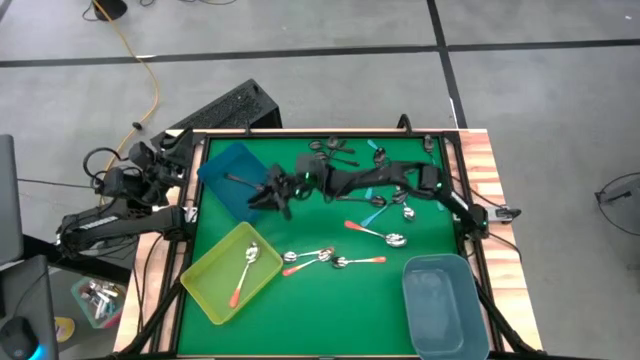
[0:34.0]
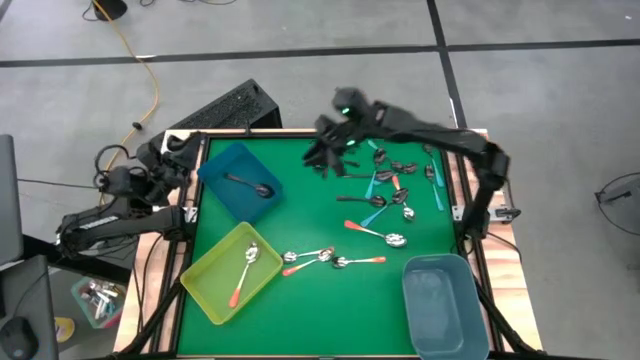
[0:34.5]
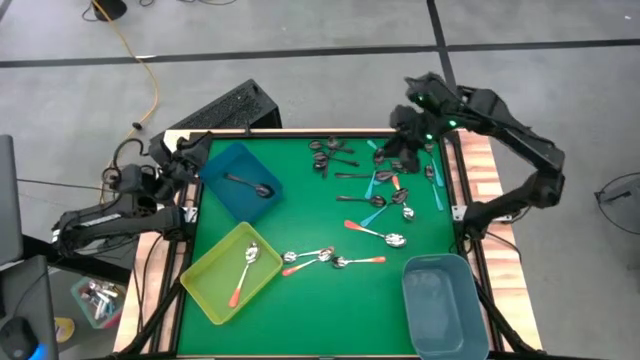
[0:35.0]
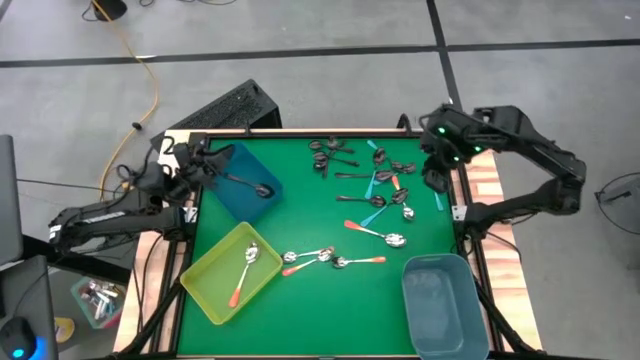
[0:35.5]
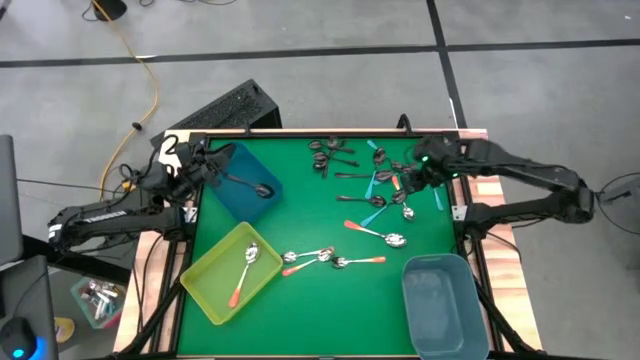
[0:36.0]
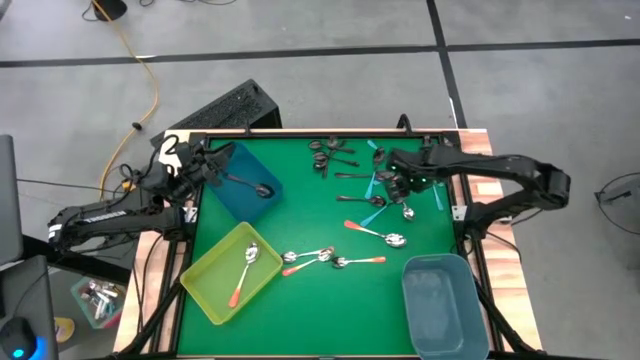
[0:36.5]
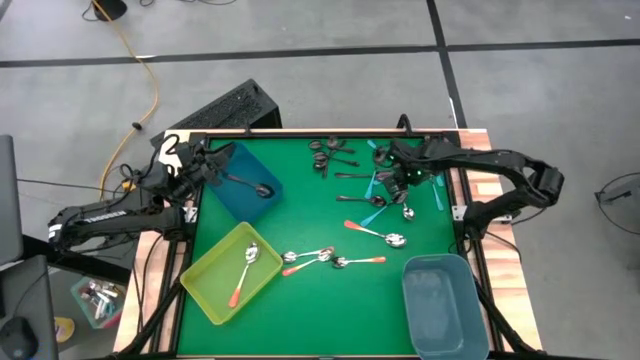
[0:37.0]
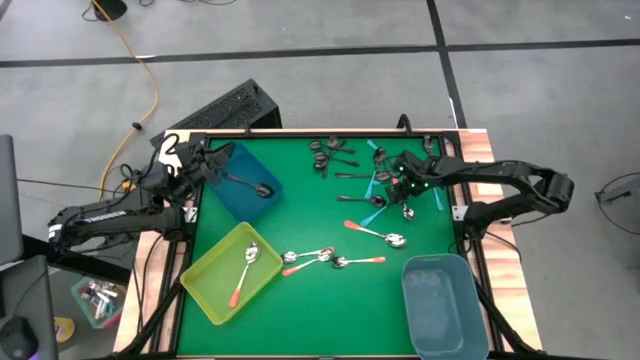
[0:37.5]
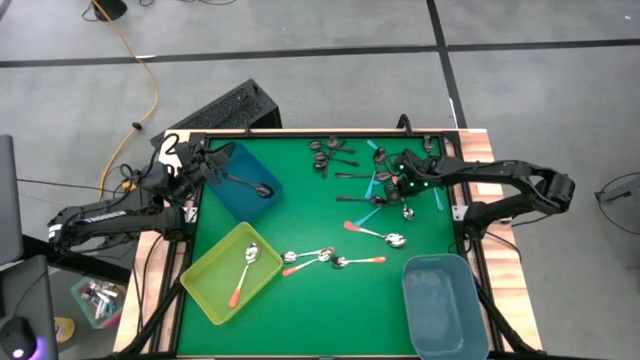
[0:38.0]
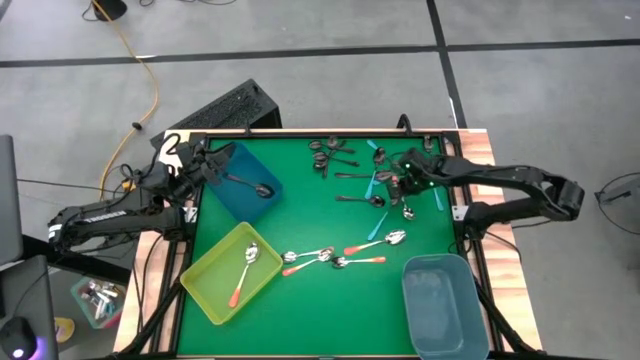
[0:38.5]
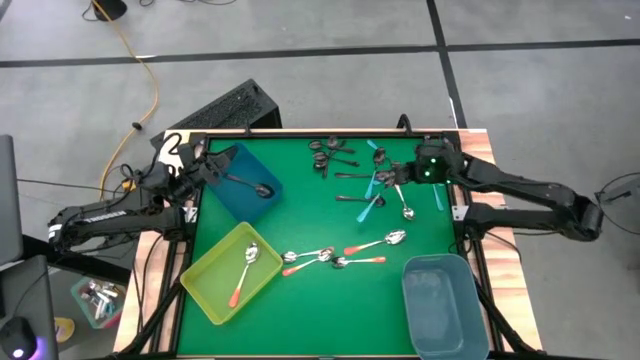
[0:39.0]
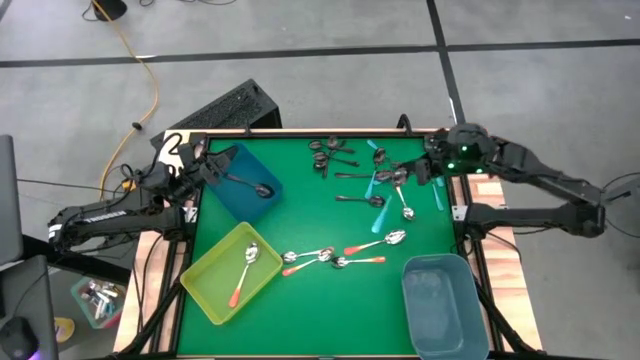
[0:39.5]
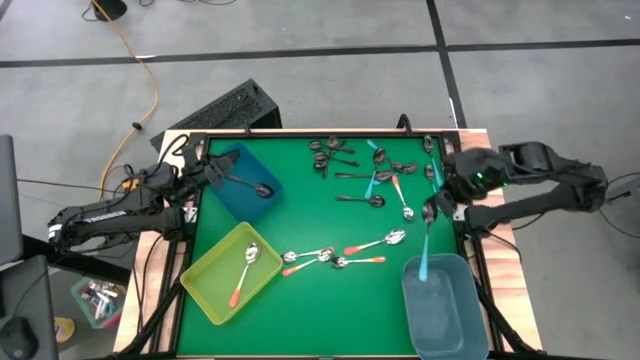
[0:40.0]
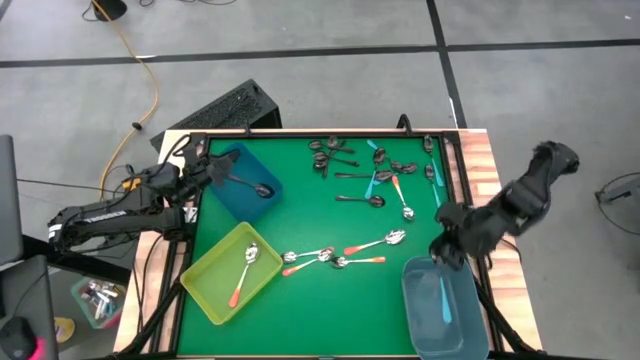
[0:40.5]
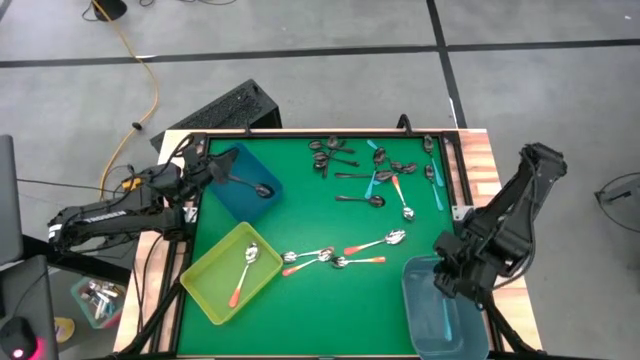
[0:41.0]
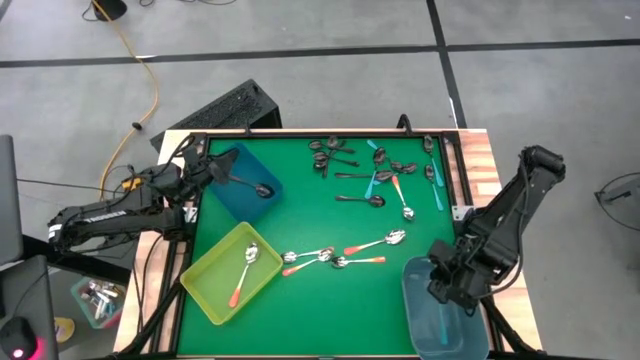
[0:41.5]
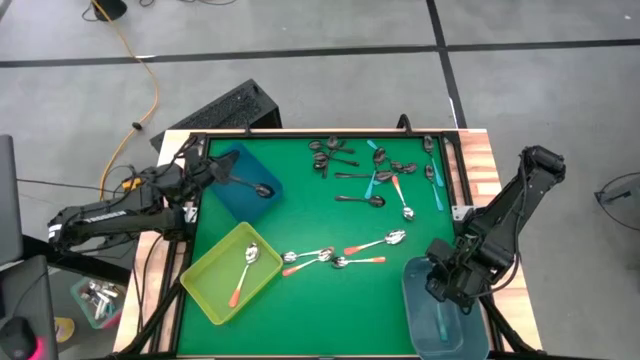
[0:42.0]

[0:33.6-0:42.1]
Task: Sort silverware by color (type)
Put the blue spoon into the blue bin

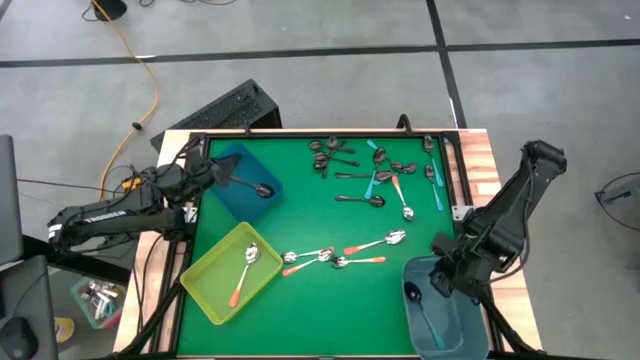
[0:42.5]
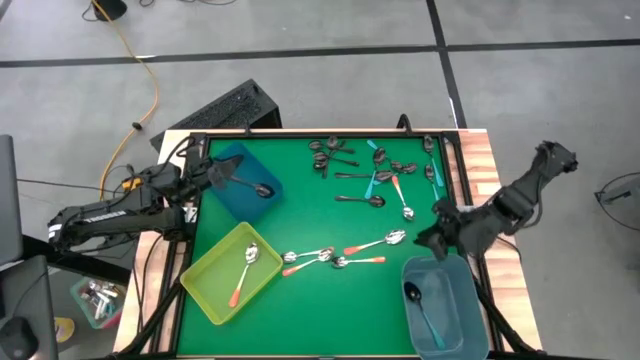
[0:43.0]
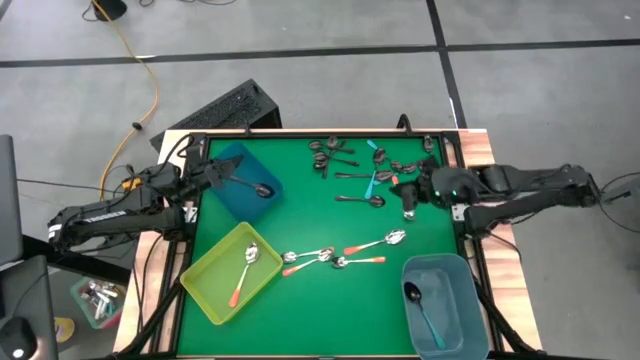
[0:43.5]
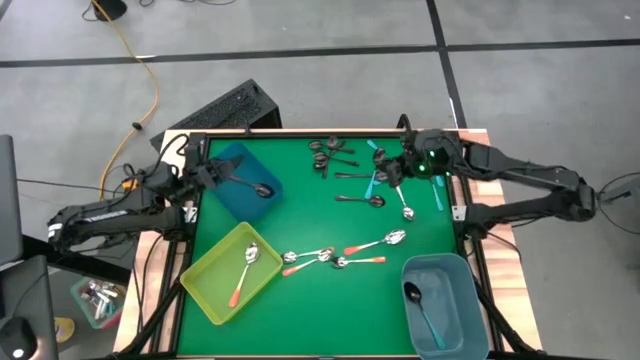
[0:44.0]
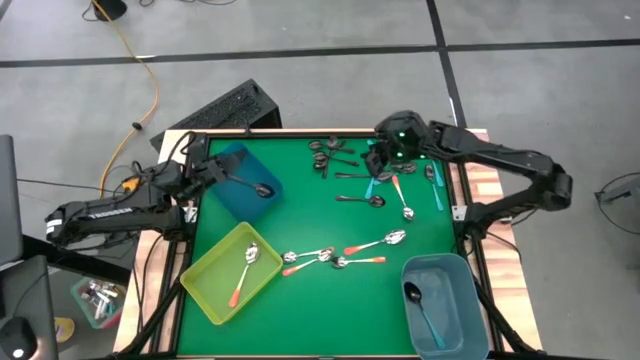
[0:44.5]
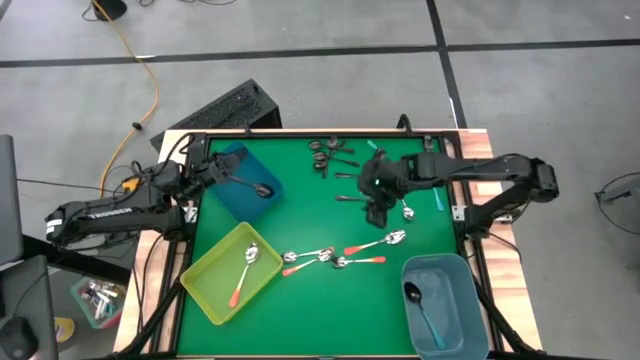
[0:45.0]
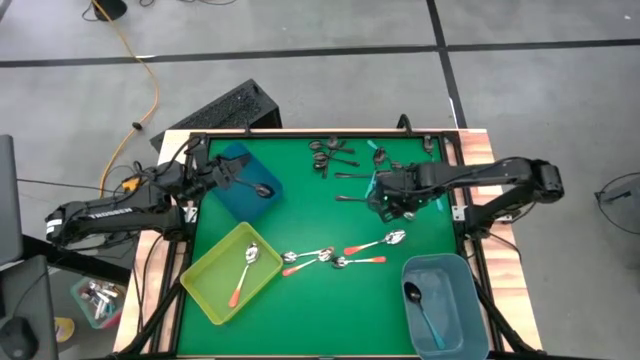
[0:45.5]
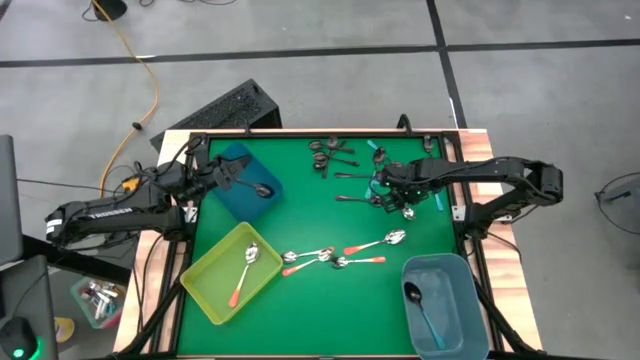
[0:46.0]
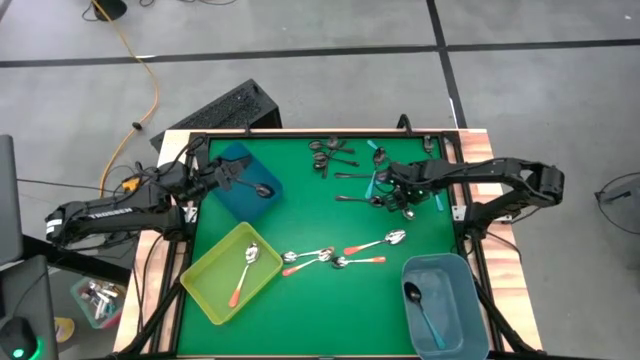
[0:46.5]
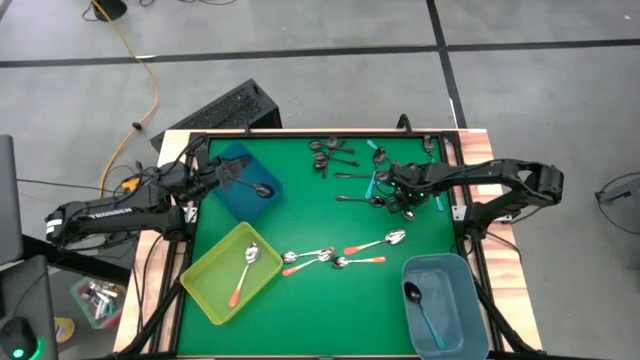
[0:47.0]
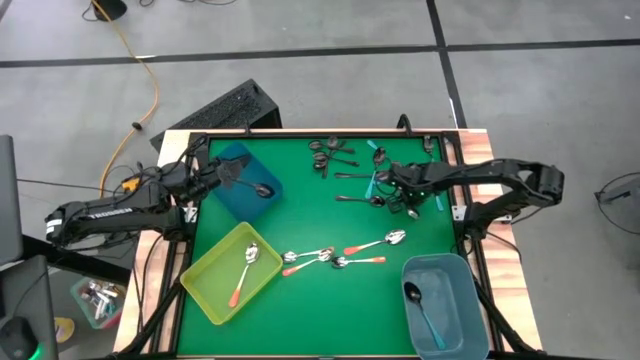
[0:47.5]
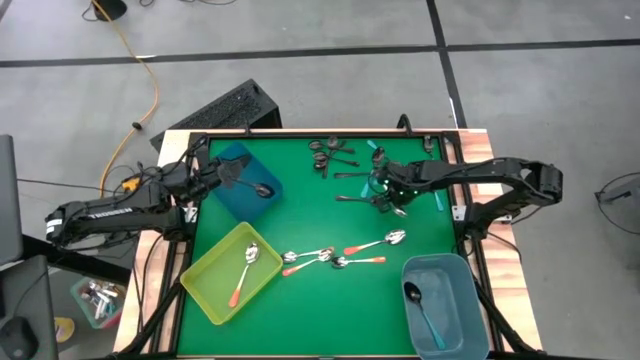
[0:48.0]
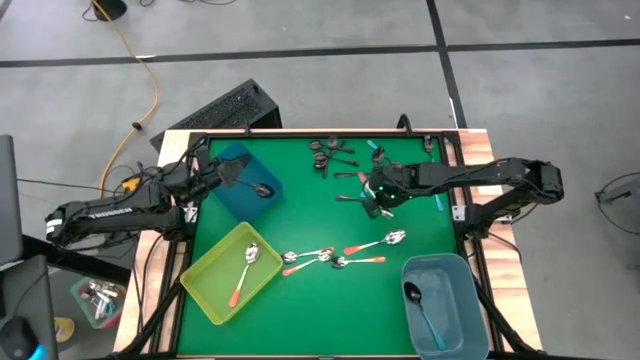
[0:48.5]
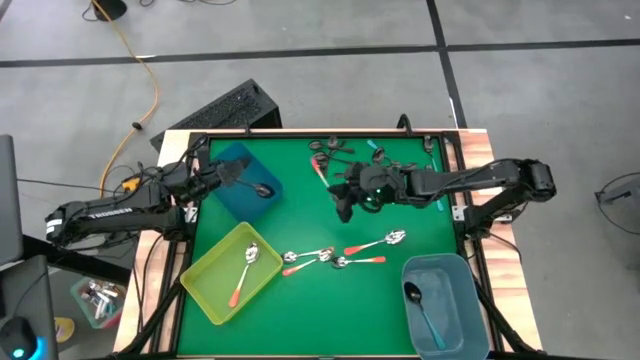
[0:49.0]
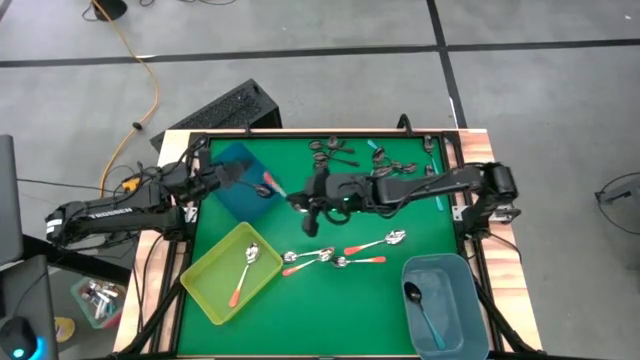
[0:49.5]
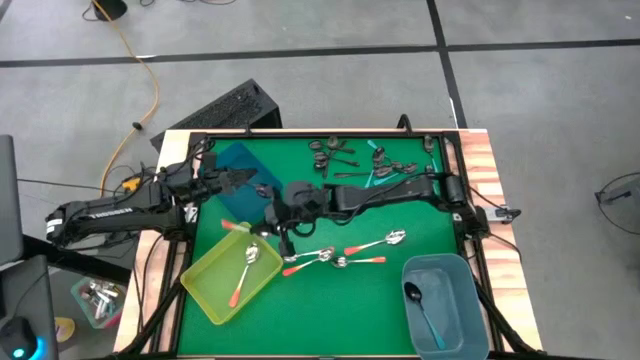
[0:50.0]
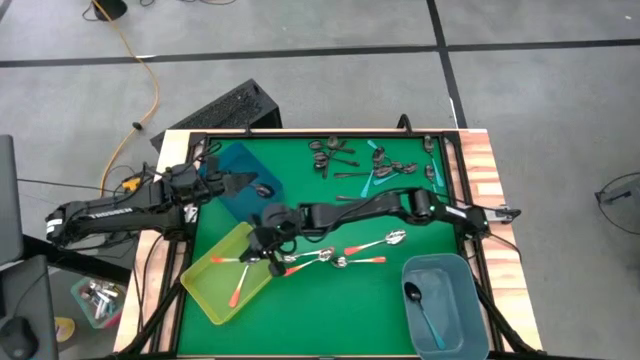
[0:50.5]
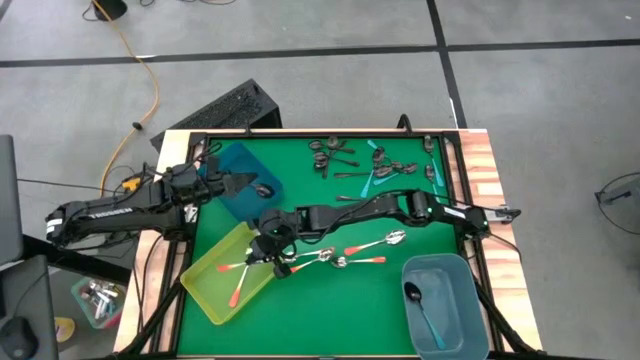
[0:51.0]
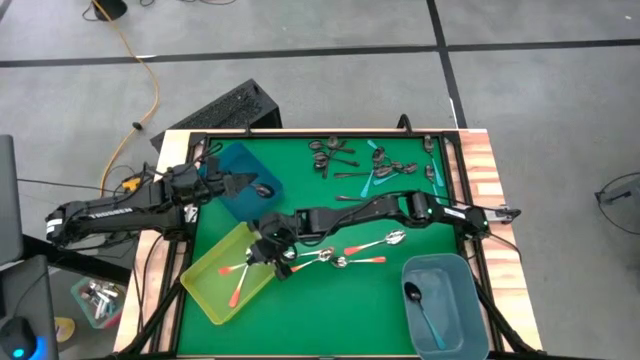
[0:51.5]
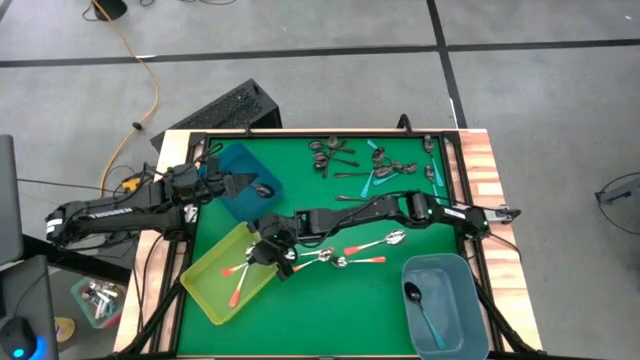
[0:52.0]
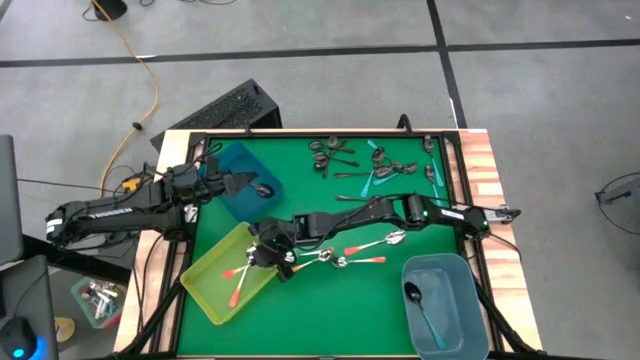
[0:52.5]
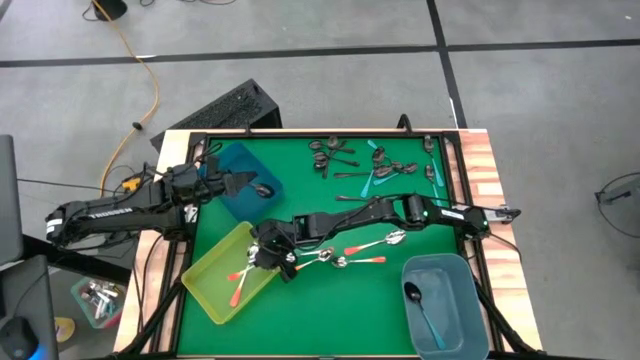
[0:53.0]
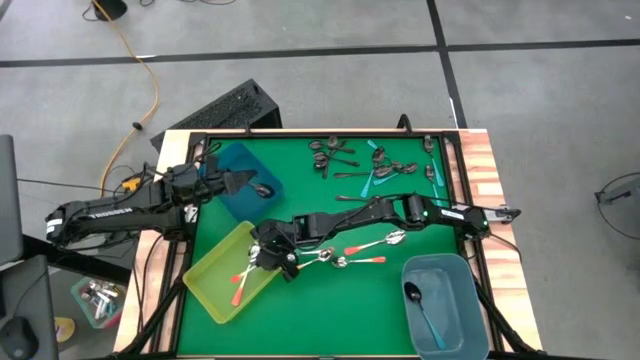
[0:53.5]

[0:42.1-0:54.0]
Put the orange spoon into the green bin
